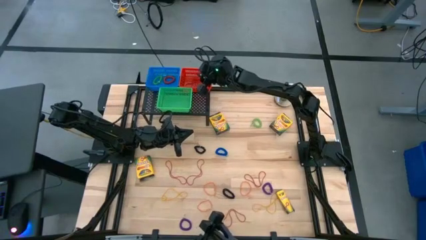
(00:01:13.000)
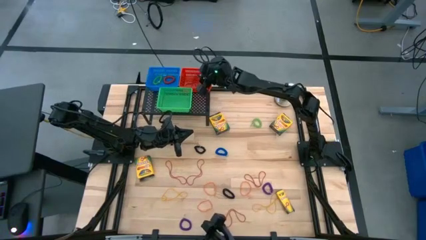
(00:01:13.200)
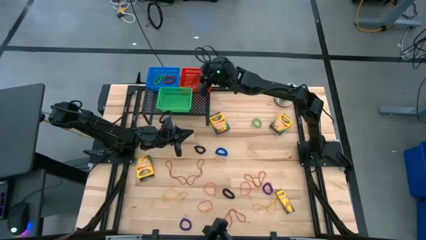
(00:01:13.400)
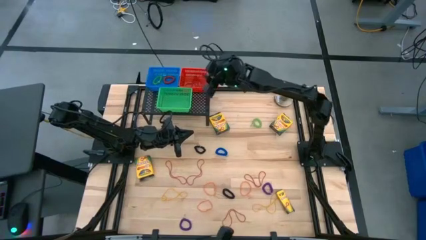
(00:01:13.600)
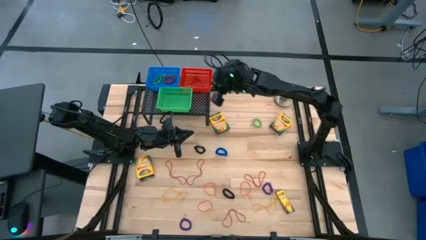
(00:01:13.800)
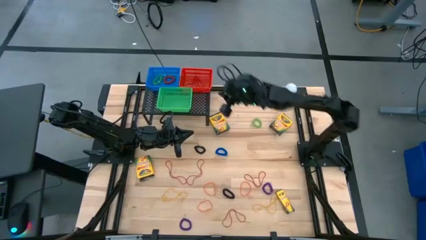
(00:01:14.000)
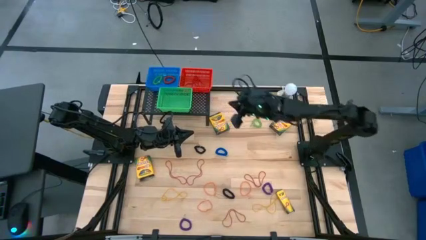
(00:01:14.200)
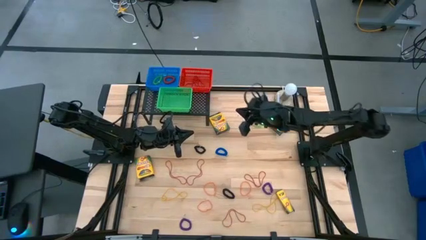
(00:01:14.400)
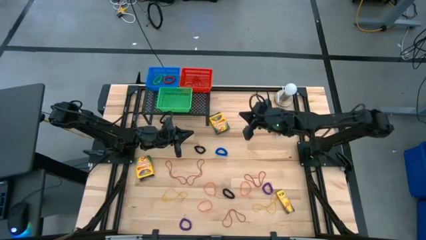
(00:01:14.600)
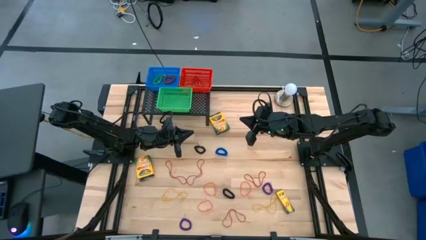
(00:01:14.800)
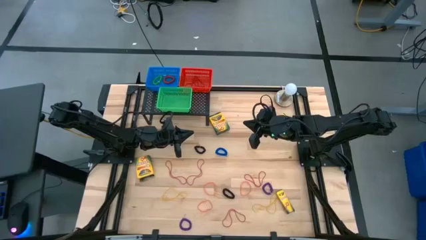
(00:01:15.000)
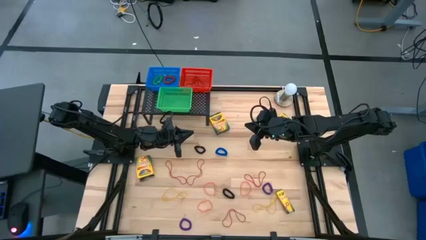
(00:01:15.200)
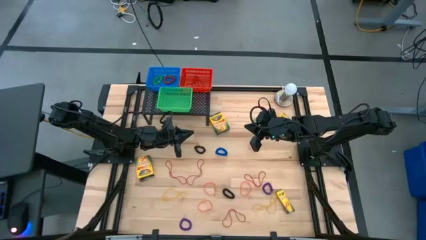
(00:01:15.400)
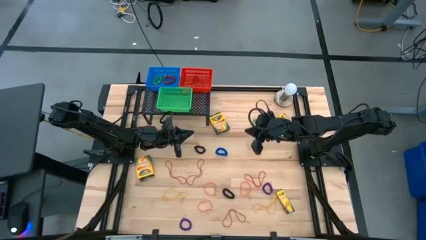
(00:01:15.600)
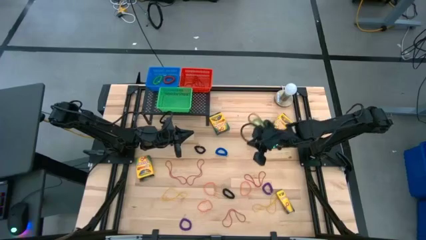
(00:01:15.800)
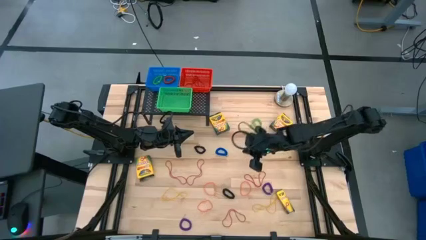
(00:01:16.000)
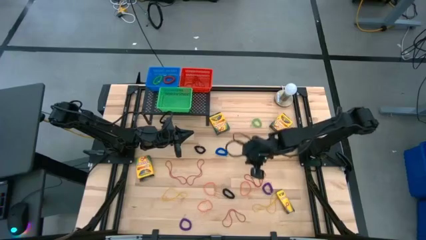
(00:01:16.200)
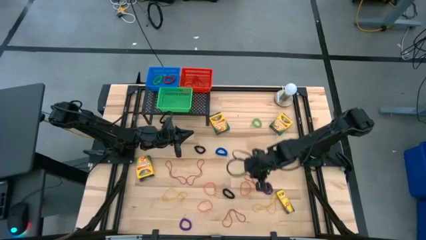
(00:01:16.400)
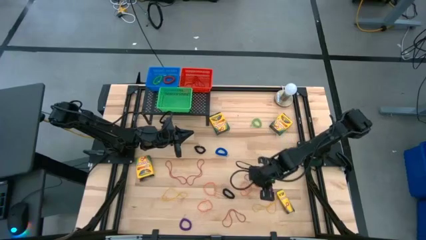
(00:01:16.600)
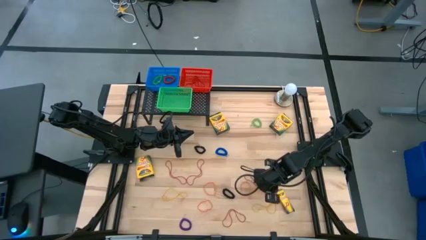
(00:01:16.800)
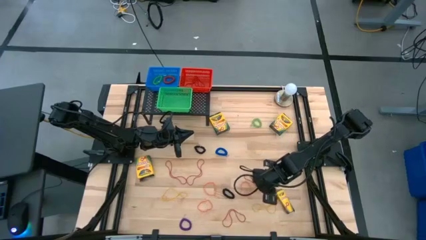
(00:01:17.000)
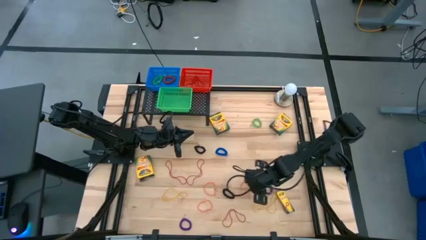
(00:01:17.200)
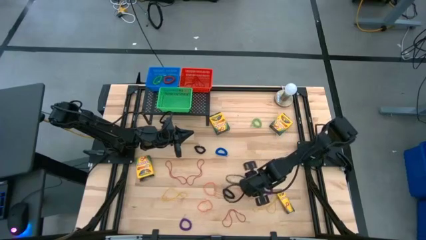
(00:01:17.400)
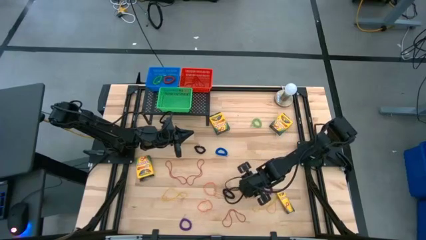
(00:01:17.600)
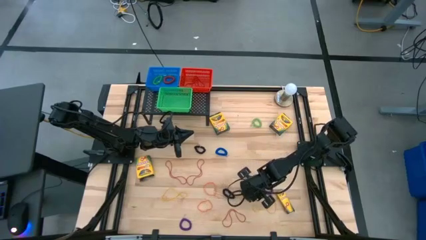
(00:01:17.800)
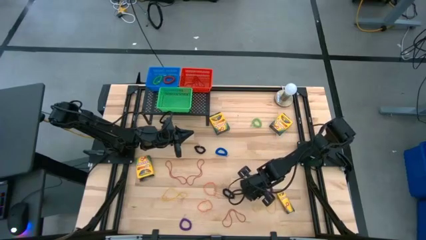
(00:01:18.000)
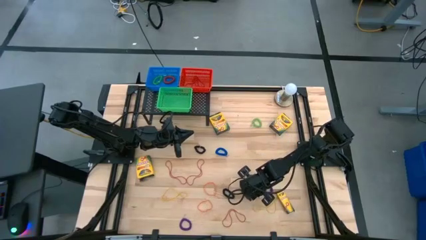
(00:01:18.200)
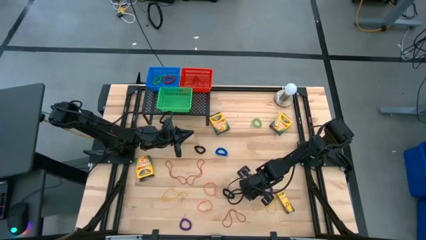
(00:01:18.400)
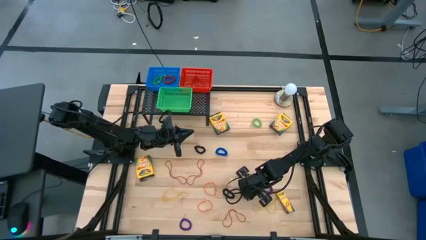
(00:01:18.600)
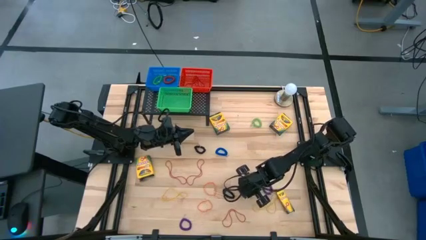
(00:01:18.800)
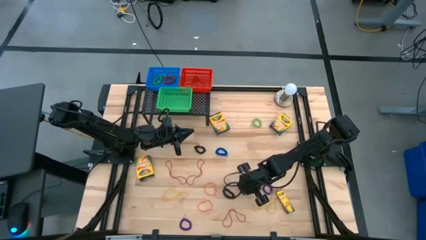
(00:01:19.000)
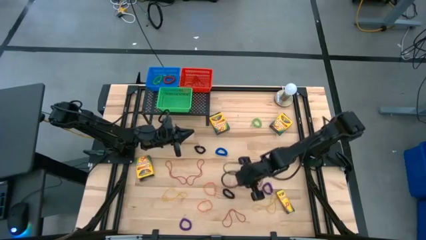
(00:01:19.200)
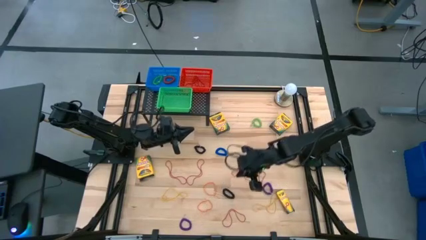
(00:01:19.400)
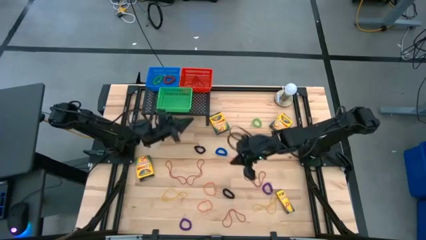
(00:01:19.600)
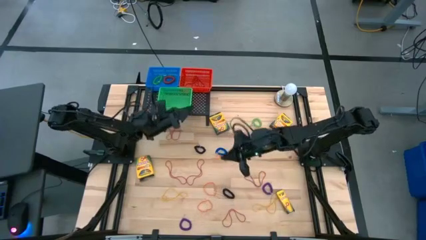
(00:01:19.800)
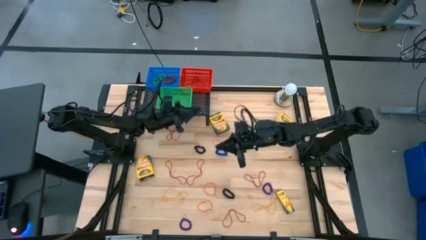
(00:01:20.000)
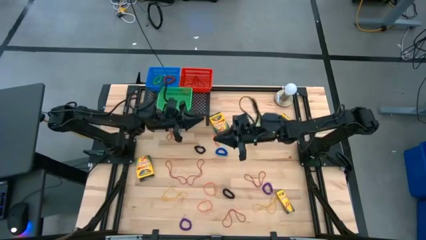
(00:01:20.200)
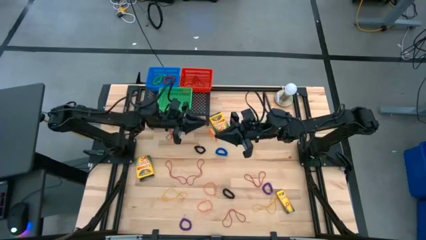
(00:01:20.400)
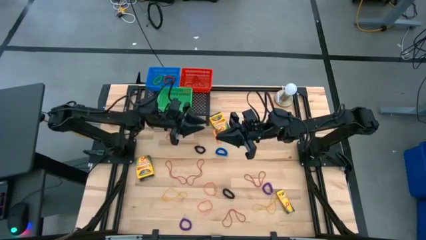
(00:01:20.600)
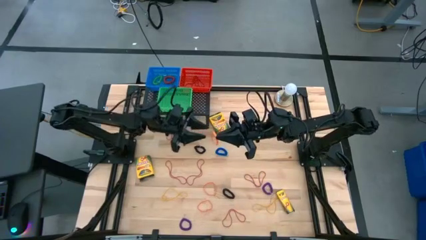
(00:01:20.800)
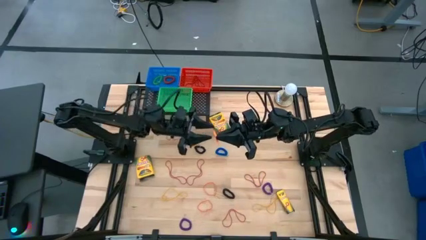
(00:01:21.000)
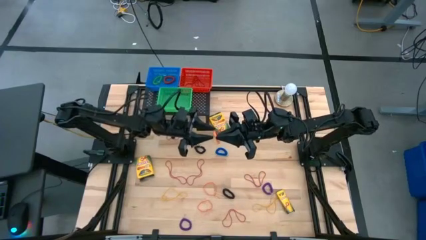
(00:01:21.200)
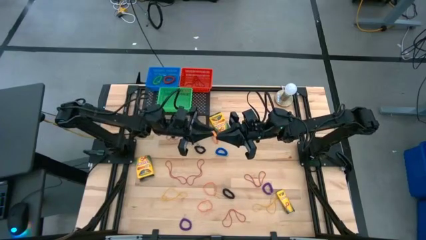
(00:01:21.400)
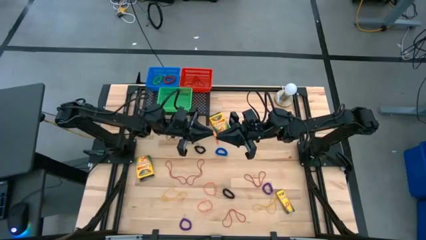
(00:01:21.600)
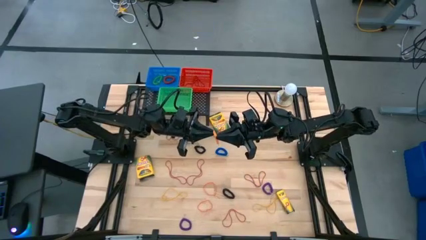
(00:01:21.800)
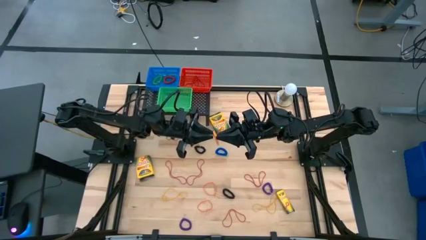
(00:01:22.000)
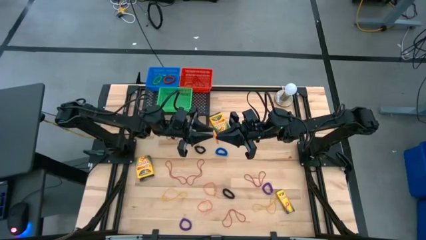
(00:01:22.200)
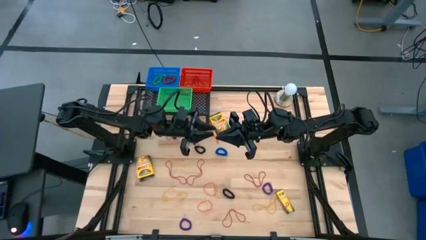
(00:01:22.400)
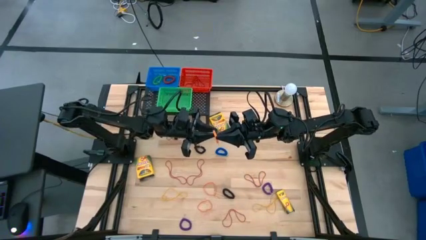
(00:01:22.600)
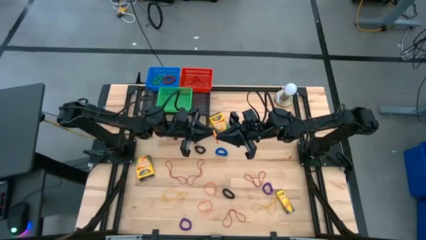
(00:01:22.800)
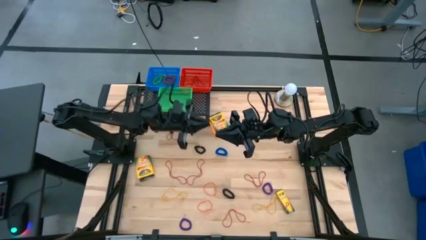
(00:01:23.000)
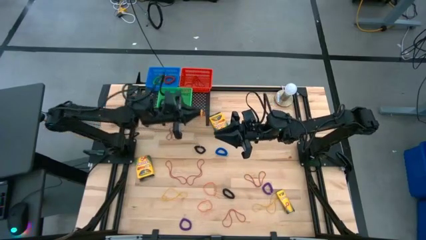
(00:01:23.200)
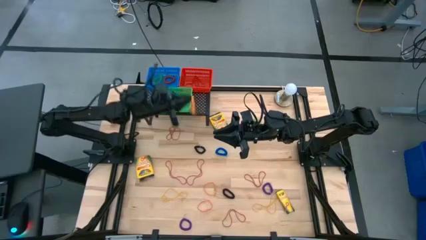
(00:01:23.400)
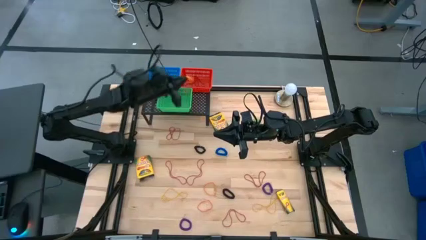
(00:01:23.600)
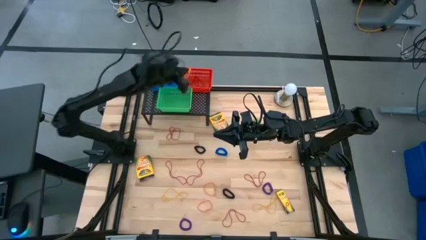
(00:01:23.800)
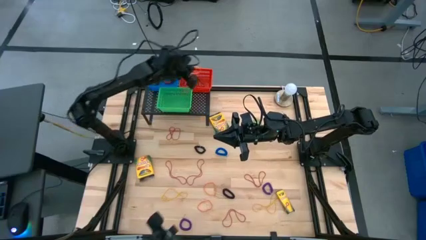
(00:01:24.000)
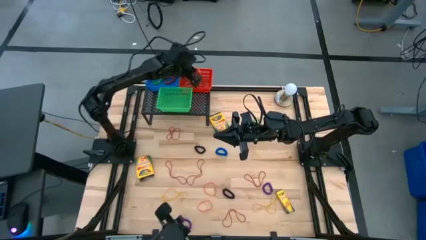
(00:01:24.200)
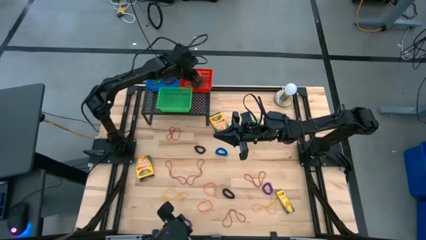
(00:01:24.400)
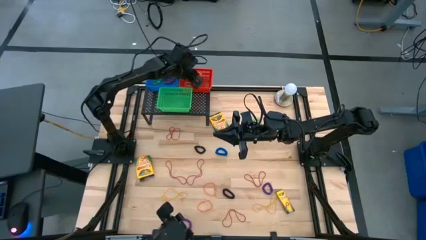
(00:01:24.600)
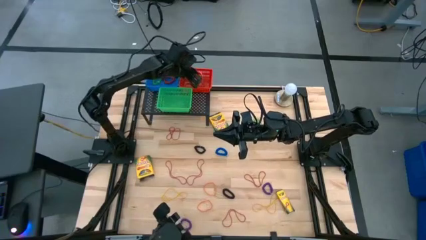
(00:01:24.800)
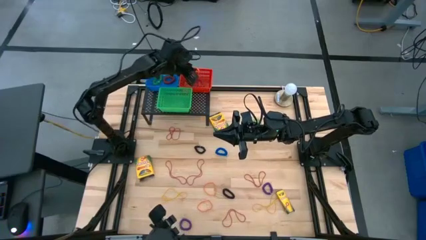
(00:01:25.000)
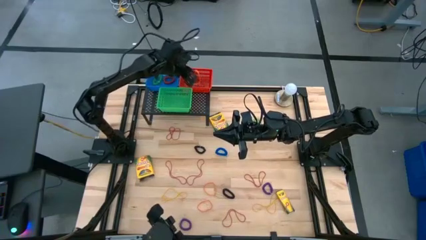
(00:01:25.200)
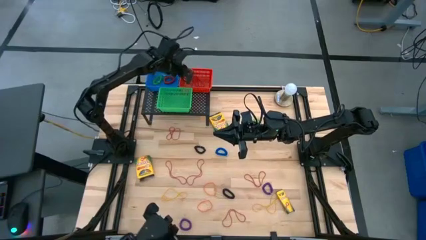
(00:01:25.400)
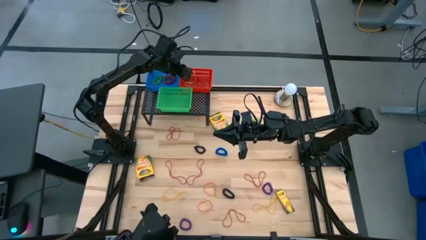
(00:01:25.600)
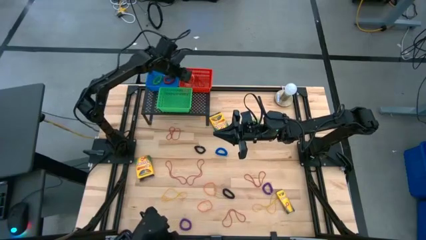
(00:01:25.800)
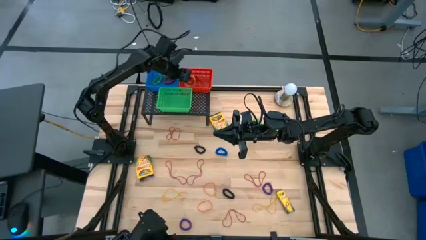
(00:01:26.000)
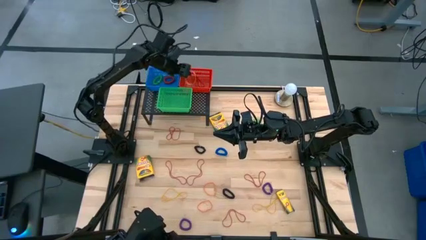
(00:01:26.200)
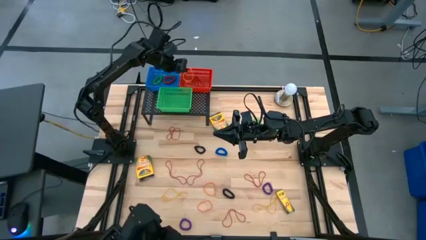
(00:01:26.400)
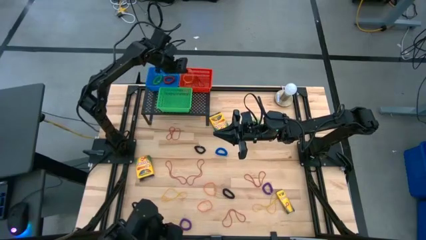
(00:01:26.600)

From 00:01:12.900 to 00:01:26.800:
Task: Pick & Place Office Desk Supplies
Put the orange rubber band into the red bin
